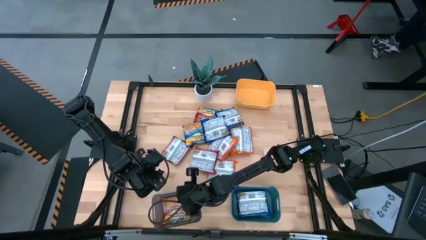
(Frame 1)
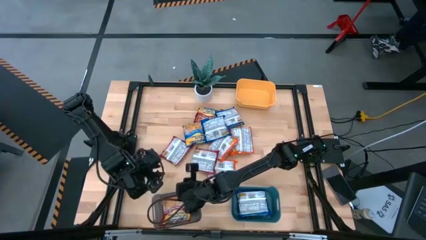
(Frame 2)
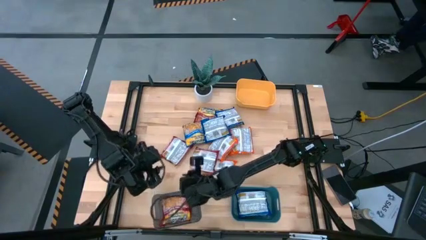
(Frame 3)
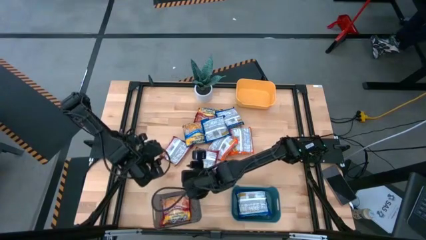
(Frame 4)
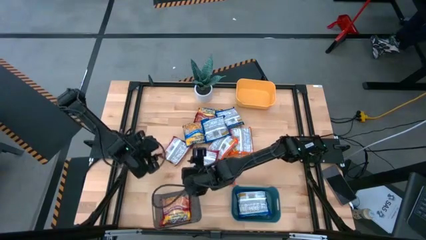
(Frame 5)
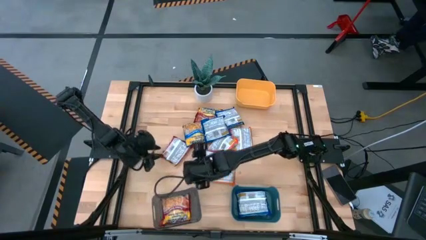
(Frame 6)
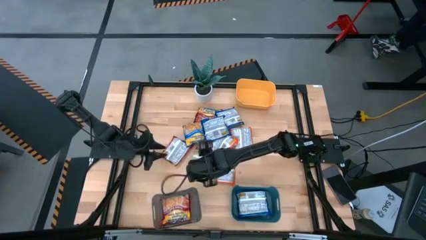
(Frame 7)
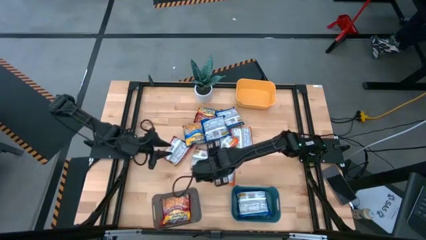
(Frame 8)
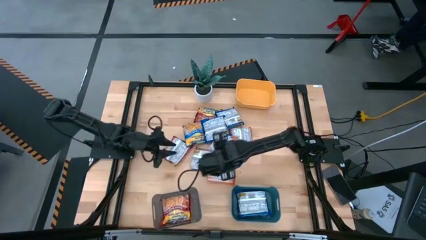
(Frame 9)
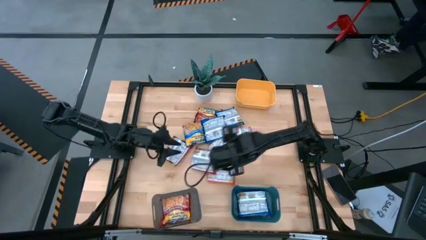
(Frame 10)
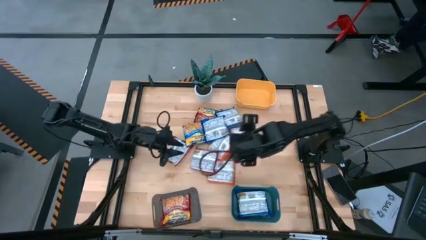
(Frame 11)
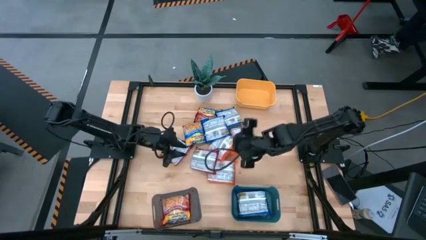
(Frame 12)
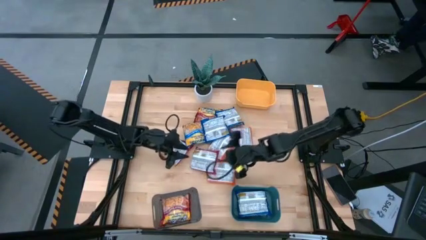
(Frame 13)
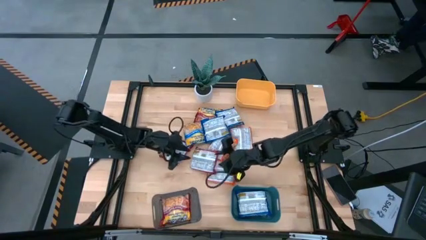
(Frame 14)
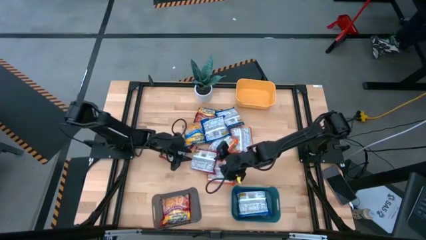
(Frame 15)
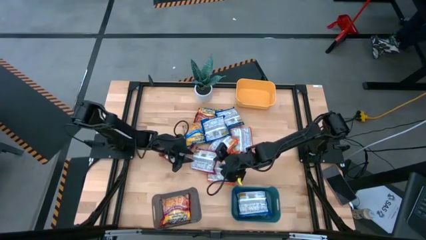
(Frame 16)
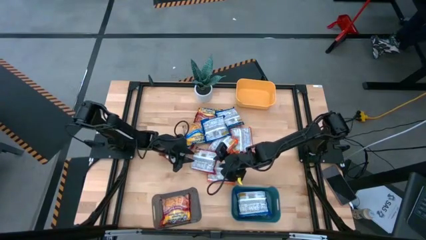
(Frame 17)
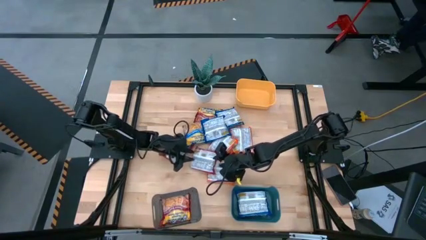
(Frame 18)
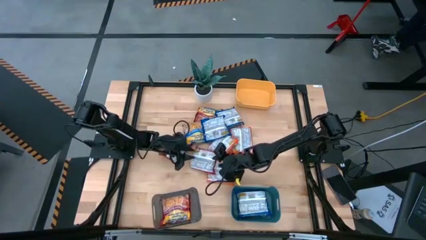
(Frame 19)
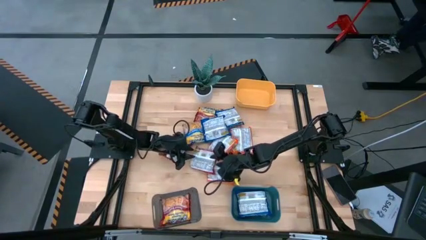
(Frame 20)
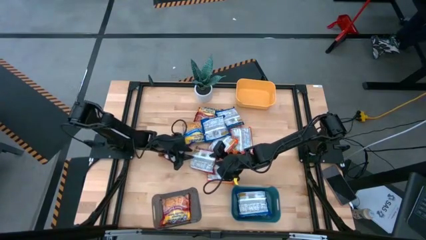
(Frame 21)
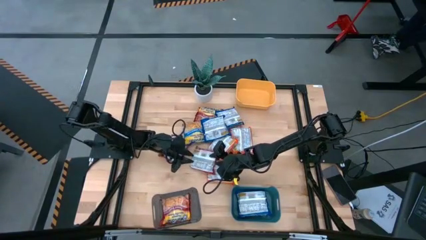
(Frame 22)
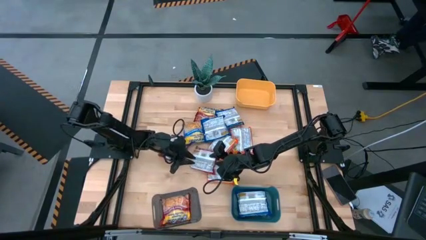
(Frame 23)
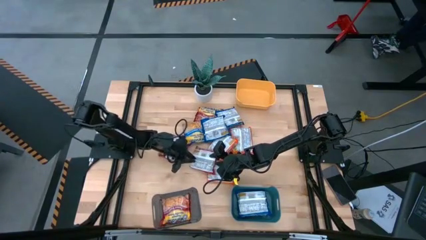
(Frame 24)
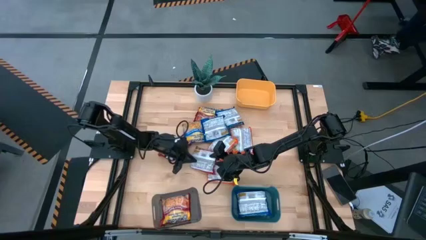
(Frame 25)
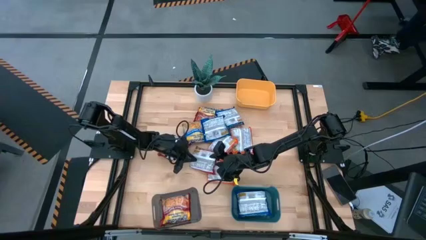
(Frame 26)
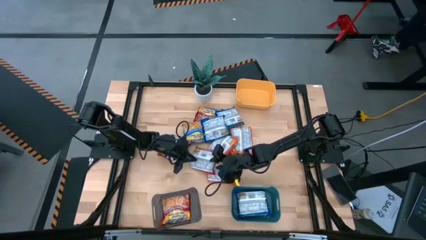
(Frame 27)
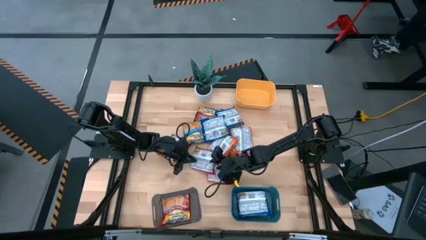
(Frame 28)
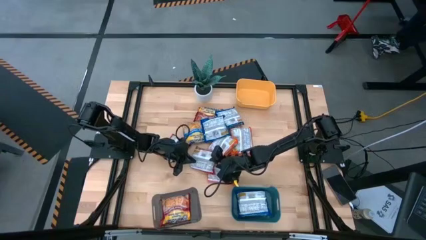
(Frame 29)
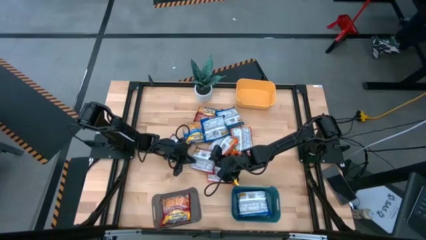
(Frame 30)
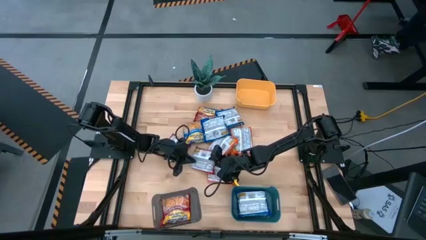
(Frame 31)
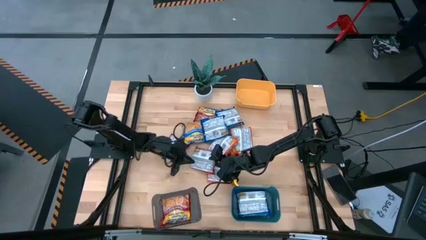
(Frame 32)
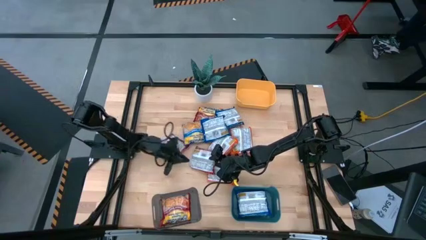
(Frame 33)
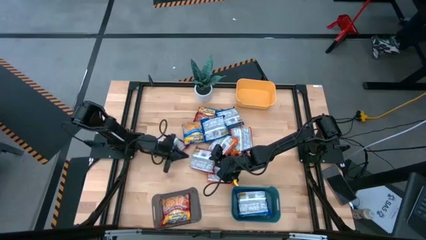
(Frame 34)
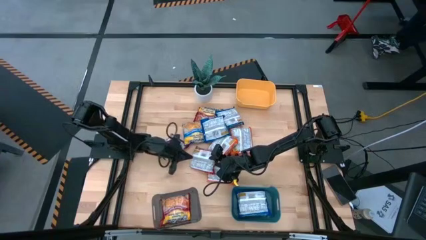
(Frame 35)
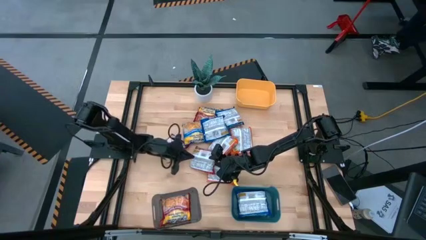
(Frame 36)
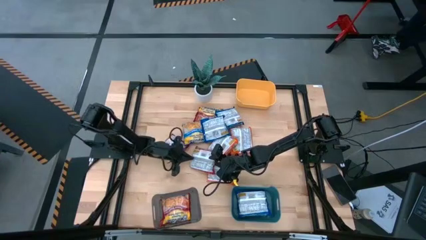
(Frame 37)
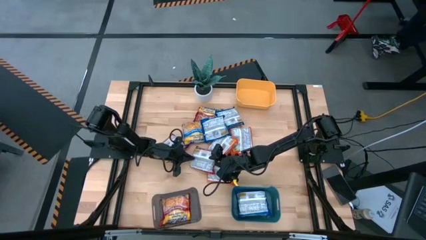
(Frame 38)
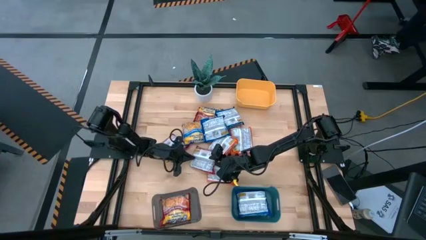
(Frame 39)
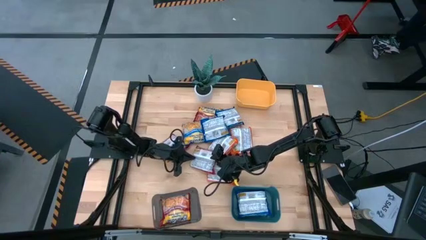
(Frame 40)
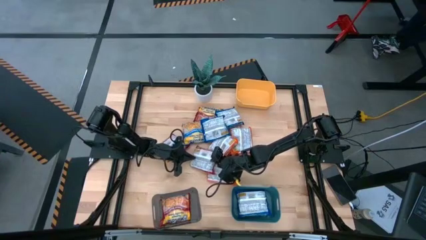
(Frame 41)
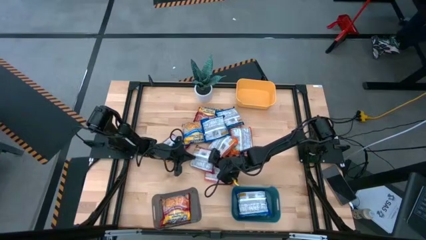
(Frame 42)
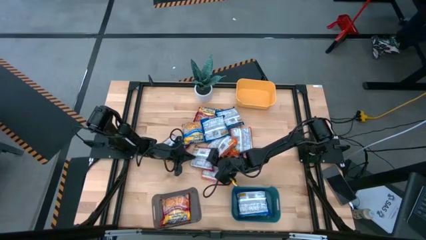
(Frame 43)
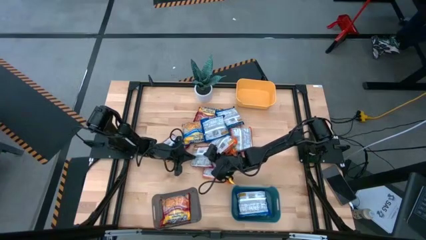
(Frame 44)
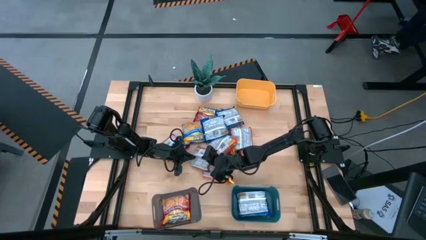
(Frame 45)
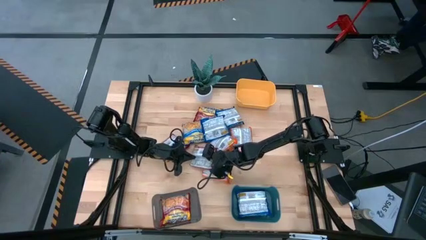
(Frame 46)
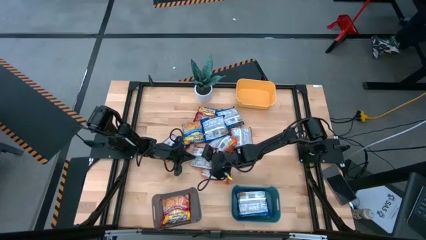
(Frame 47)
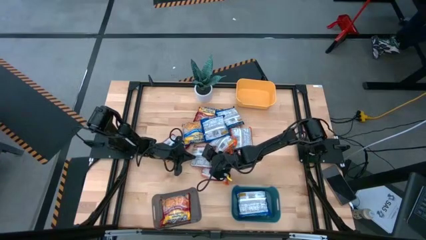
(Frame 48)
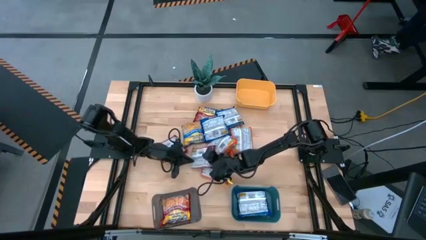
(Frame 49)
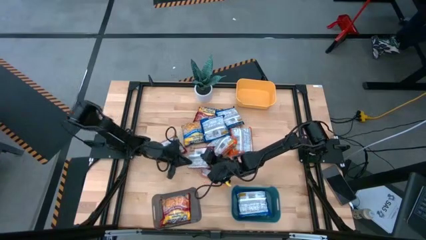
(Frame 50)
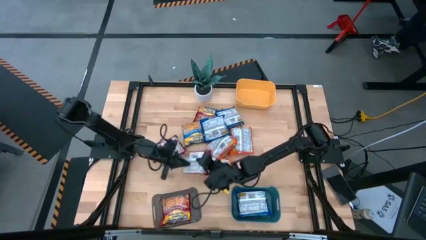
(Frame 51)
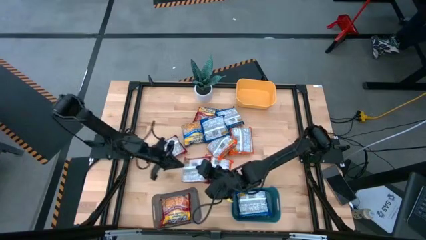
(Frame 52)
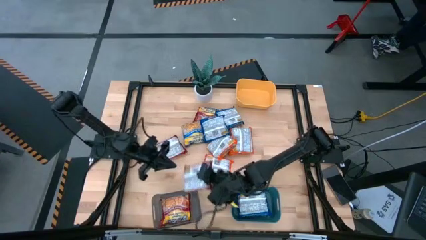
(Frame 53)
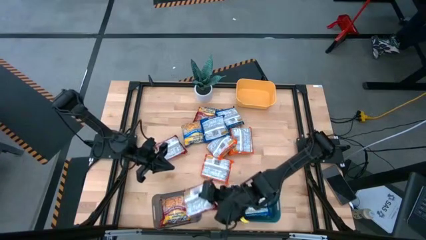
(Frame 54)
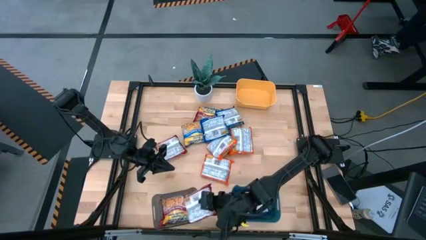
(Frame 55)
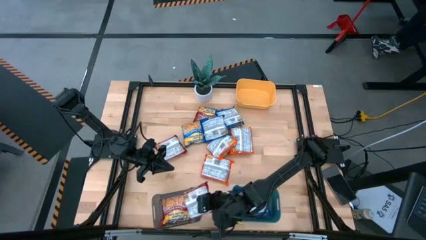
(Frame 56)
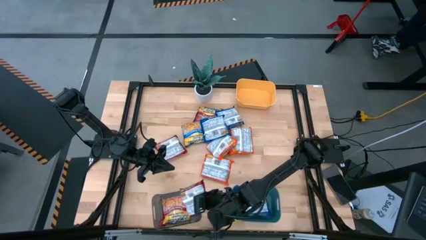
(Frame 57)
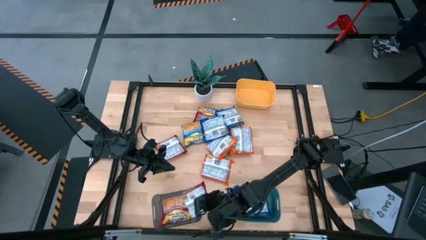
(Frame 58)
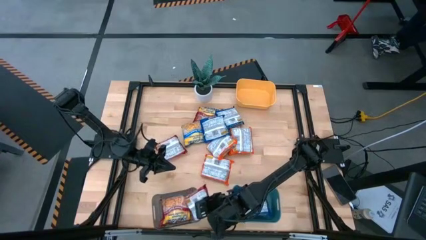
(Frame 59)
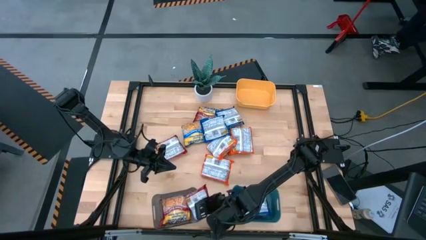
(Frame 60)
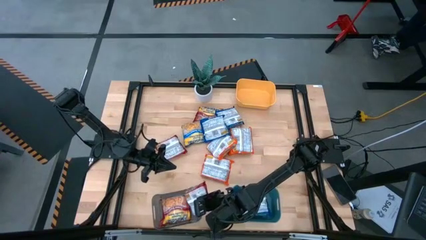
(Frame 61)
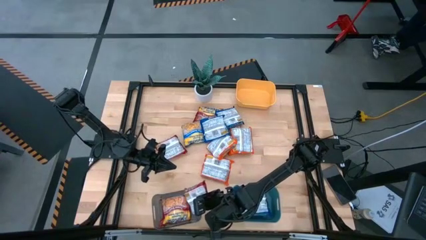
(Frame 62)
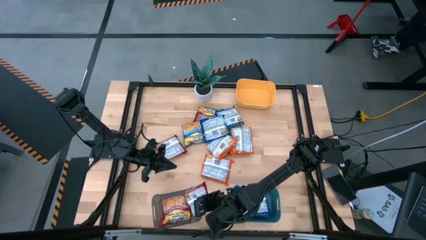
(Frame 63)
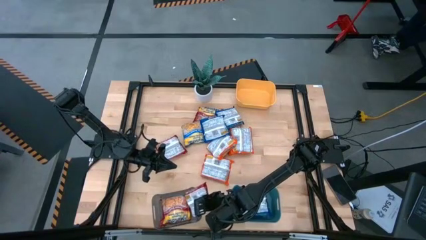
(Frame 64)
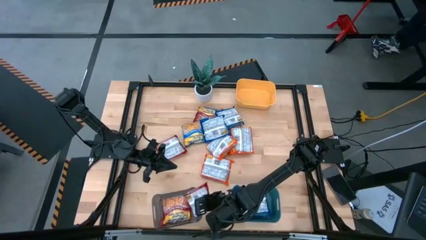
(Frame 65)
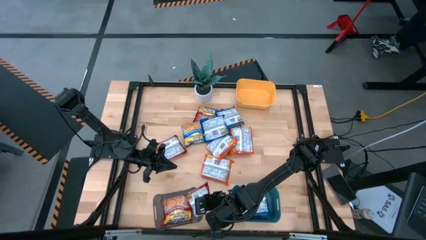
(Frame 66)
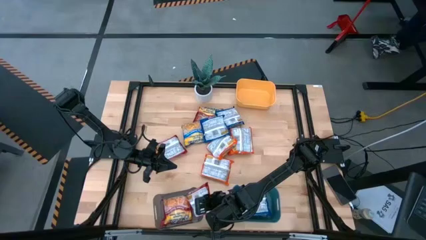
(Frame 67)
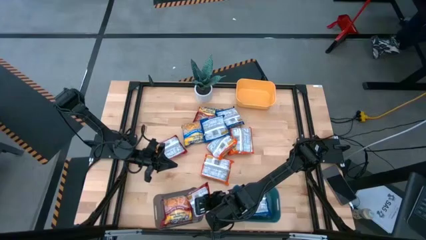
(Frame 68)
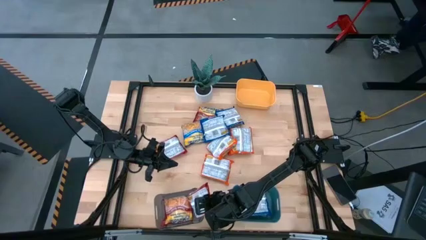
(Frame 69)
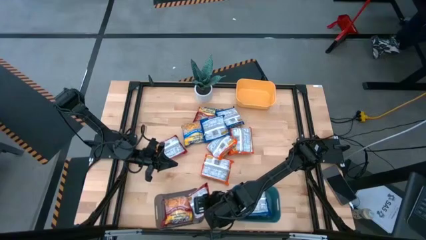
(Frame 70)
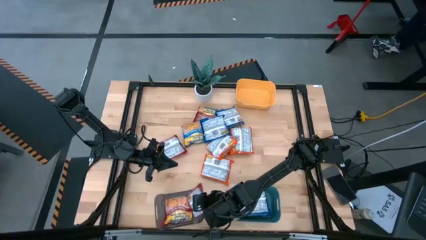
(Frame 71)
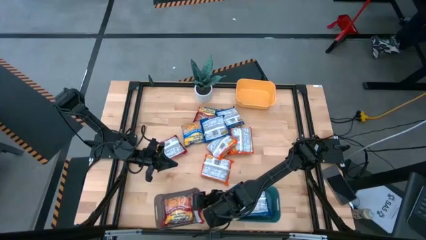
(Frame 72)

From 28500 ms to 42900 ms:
Task: Sort Maruchan noodles
Put the red noodle pack into the black bin
